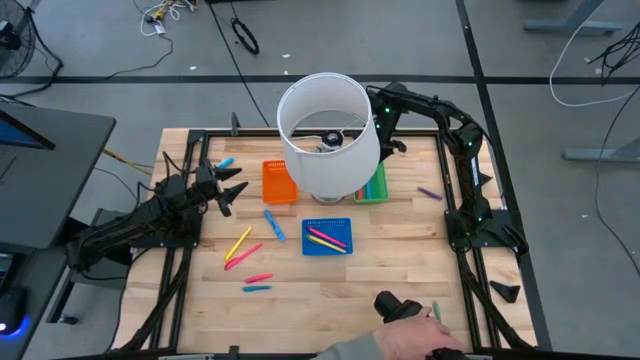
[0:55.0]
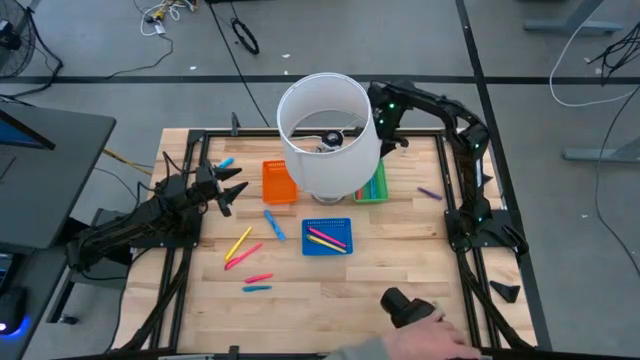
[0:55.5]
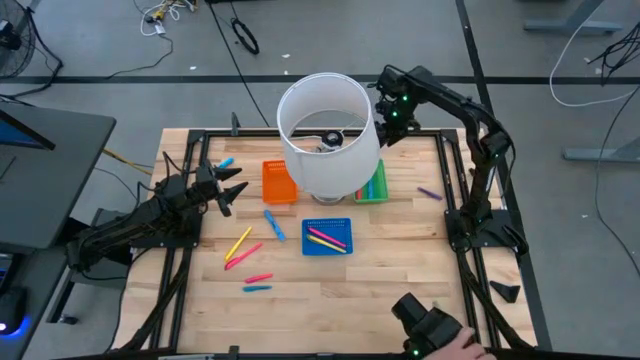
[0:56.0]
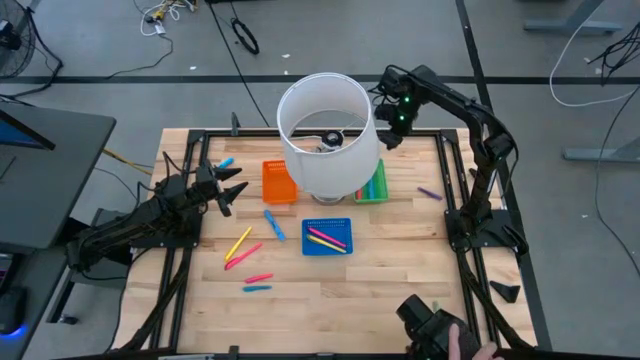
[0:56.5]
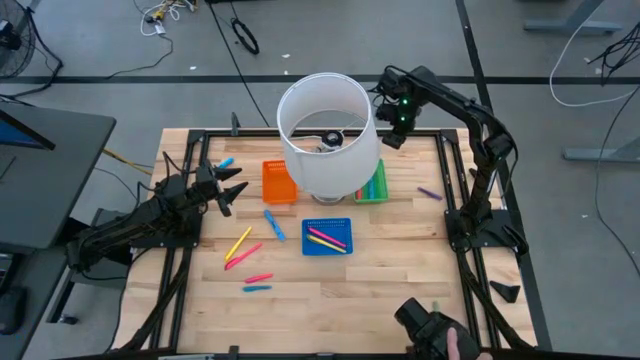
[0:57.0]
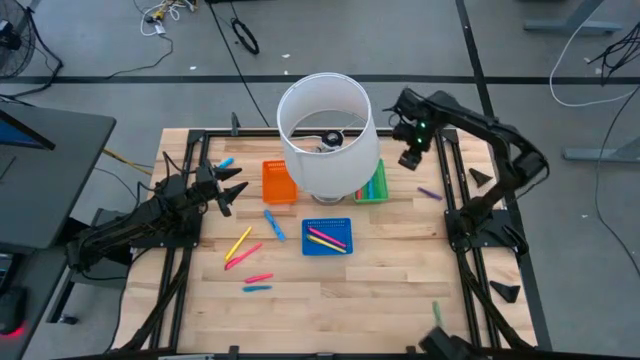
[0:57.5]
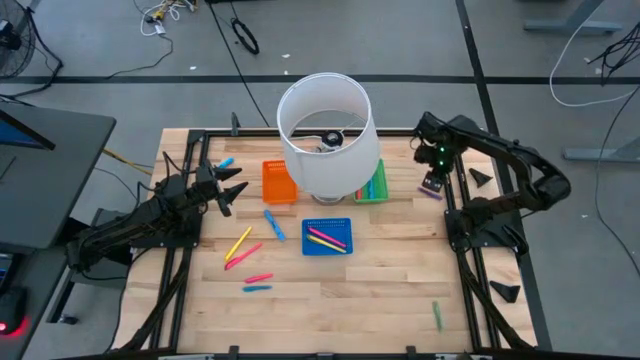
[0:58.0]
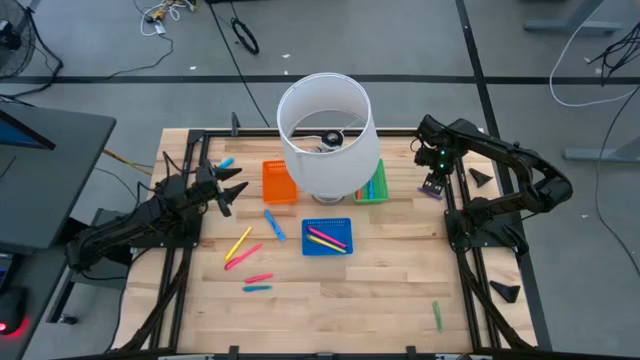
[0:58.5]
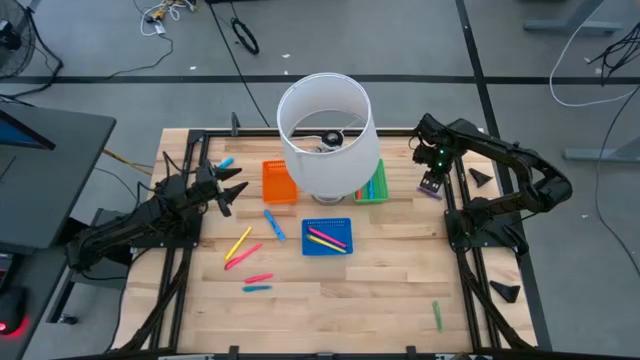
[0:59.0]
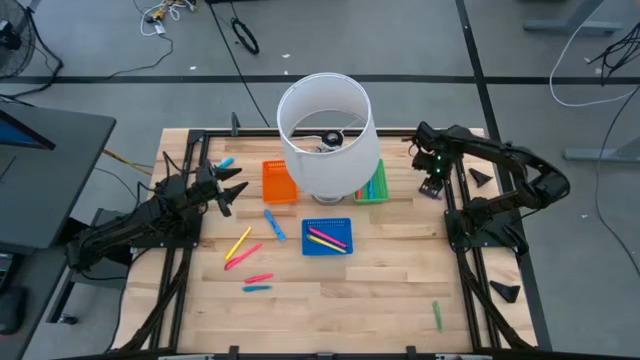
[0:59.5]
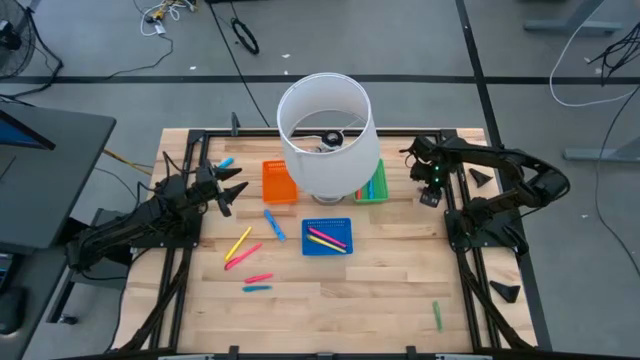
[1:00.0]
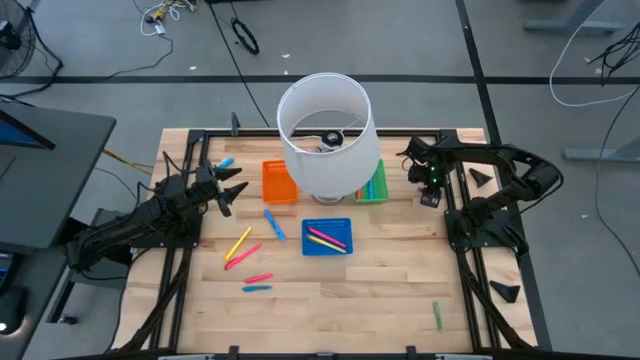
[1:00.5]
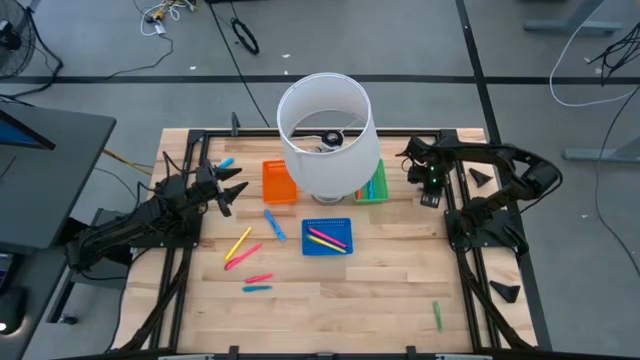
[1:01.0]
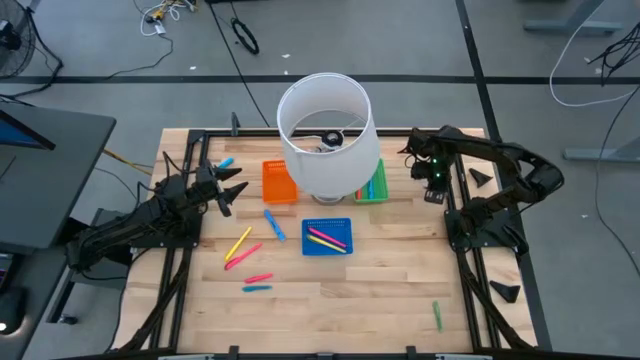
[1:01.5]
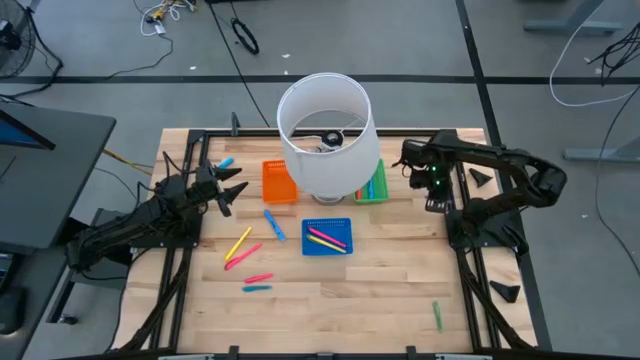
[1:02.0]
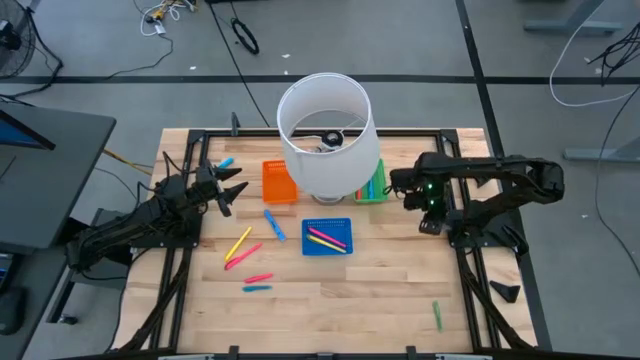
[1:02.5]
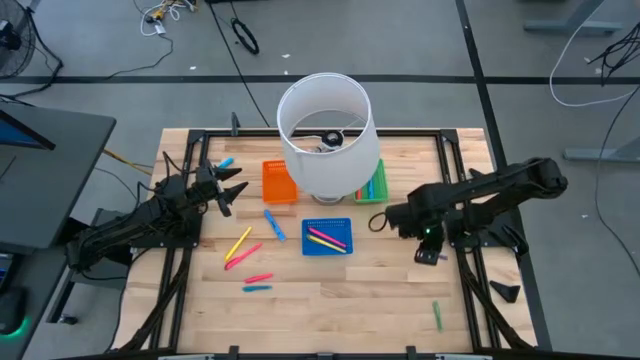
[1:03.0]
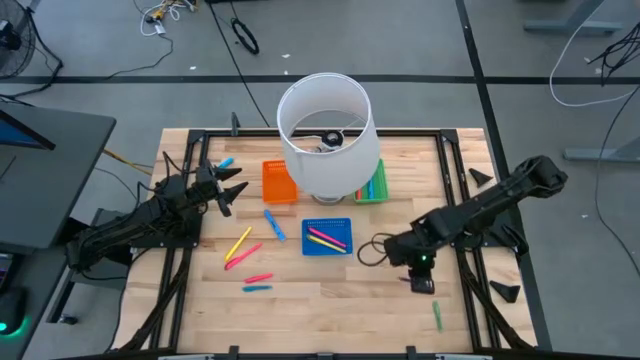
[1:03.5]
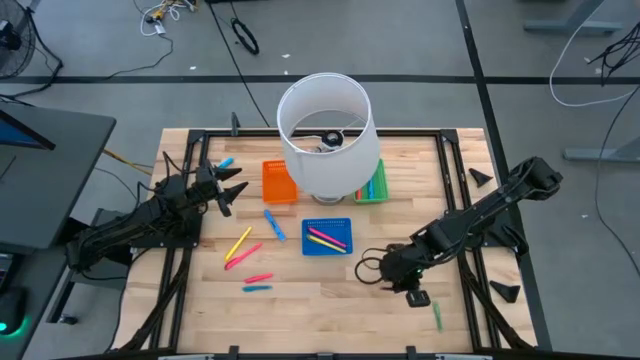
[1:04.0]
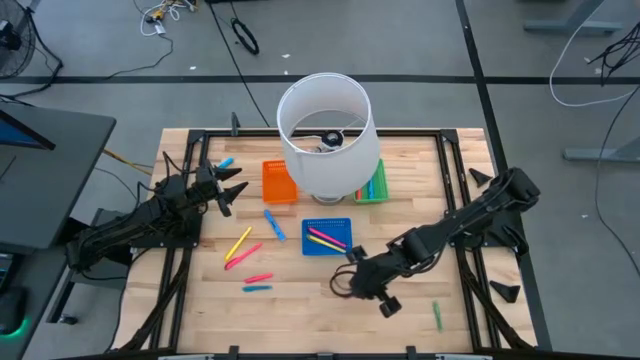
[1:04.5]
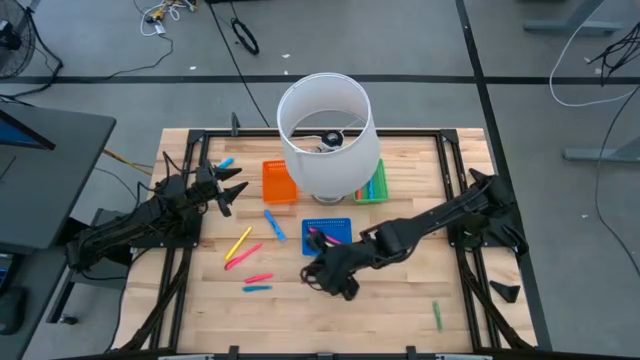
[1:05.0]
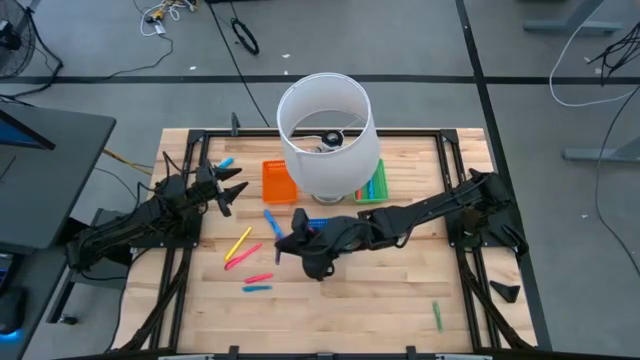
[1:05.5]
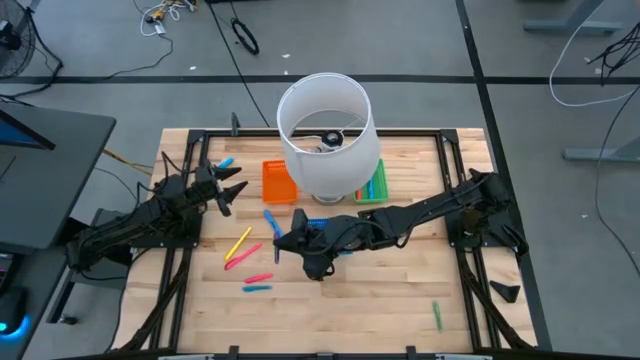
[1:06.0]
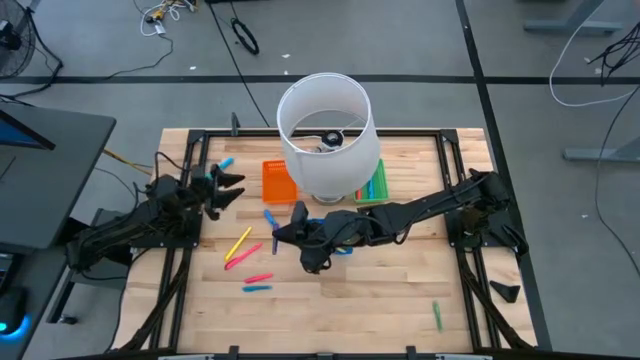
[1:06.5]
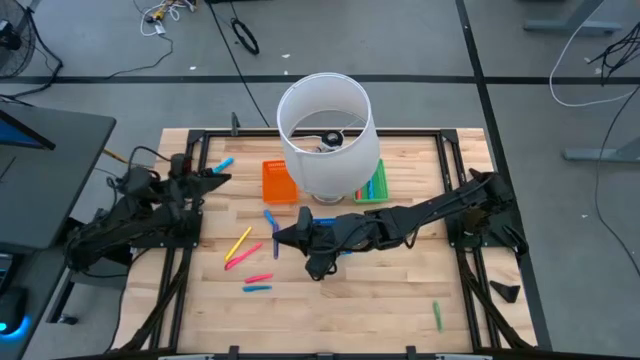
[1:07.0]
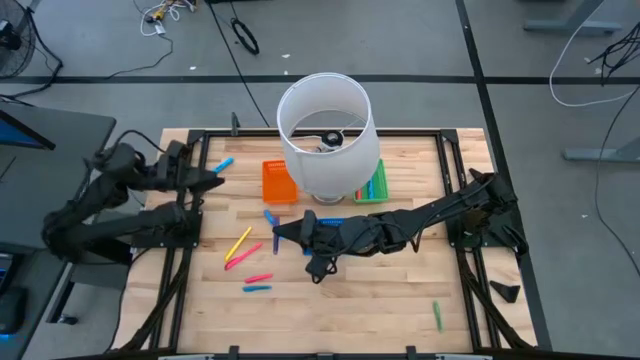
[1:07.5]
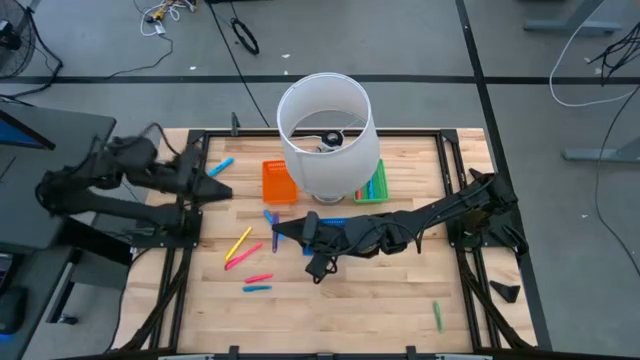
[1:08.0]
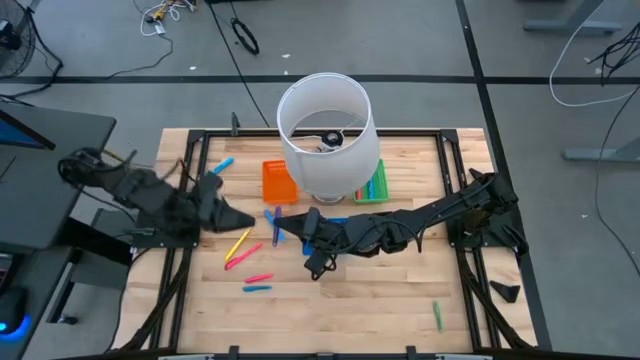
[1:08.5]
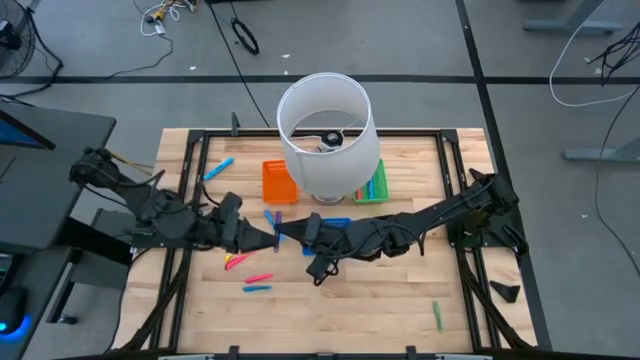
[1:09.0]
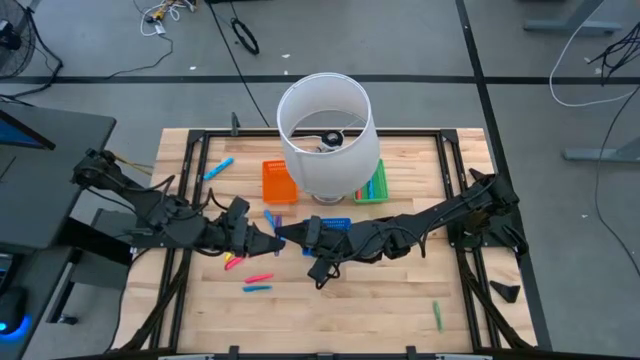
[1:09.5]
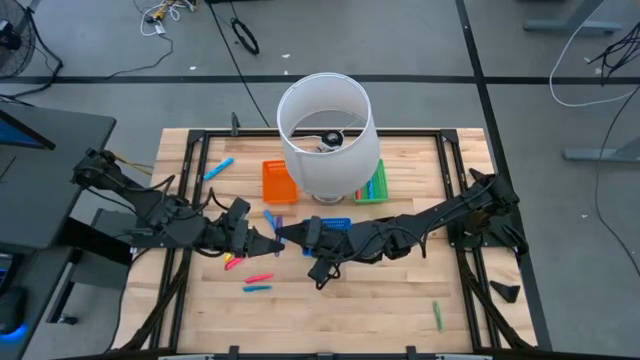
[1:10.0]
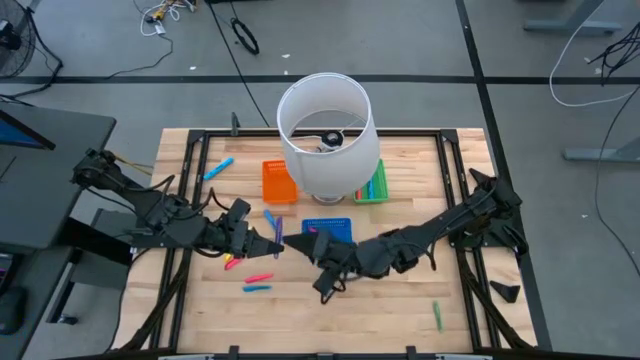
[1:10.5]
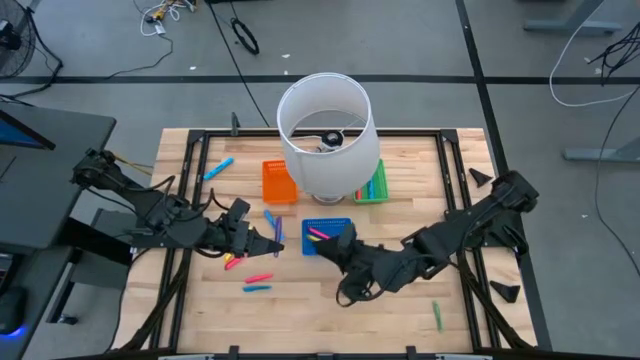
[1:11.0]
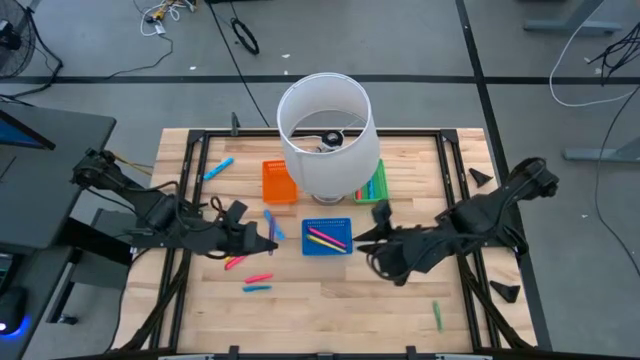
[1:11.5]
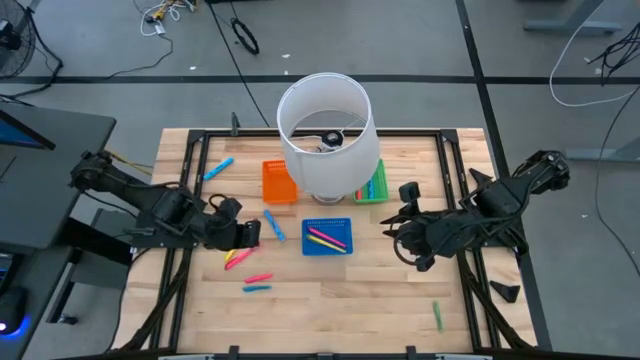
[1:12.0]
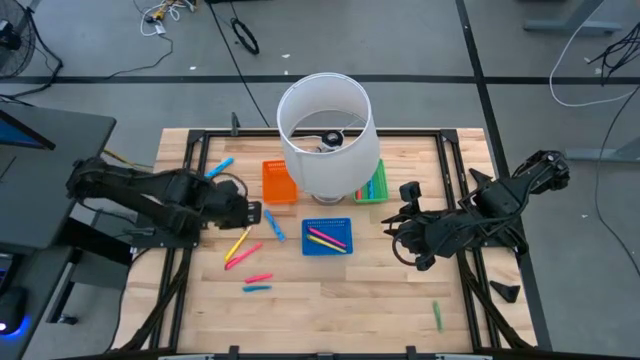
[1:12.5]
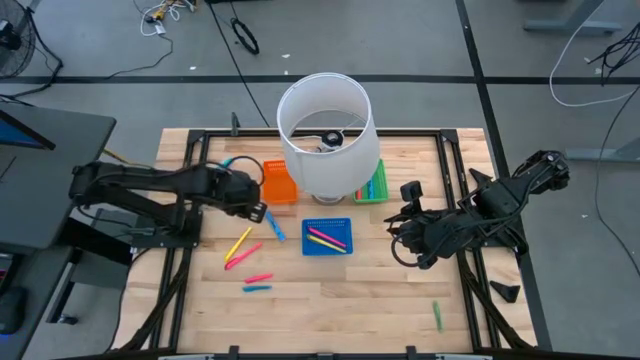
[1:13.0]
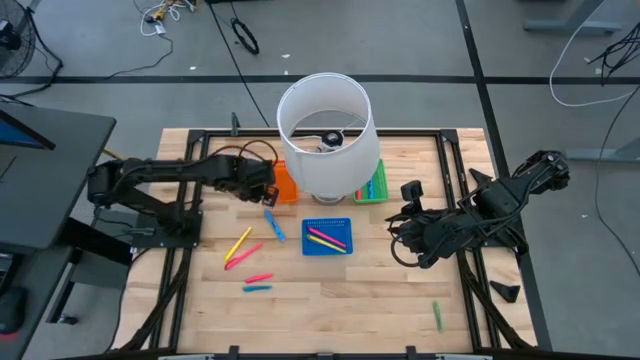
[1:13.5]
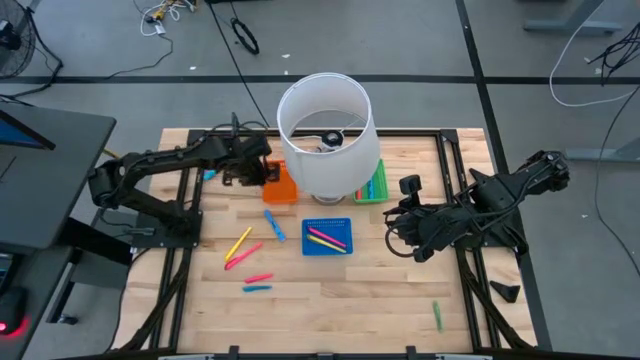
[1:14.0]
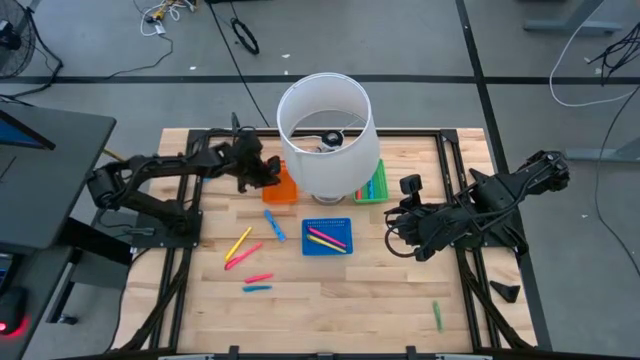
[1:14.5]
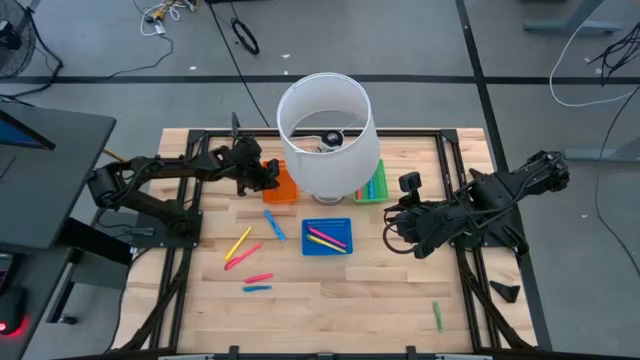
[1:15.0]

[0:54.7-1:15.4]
Task: Pick & Place Markers
Put the purple small highlighter pen into the orange bin
